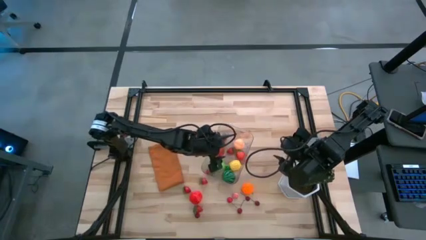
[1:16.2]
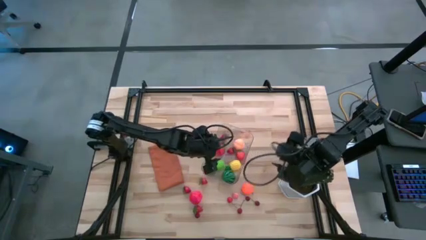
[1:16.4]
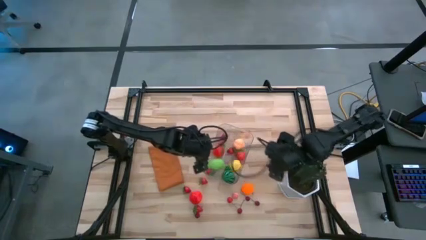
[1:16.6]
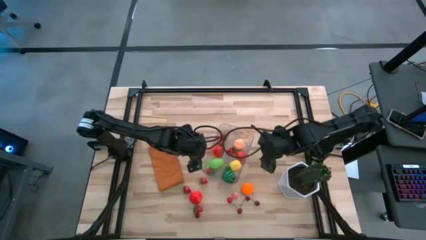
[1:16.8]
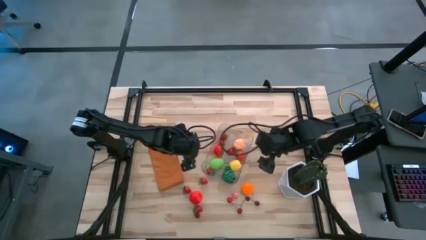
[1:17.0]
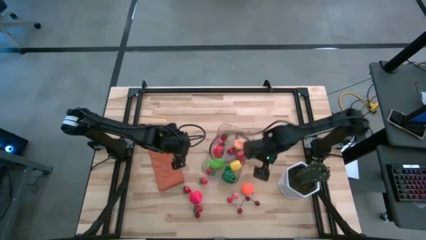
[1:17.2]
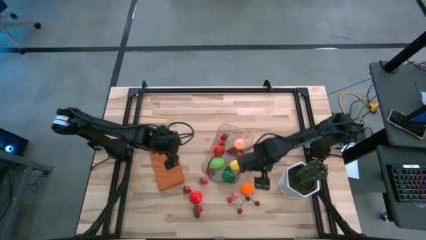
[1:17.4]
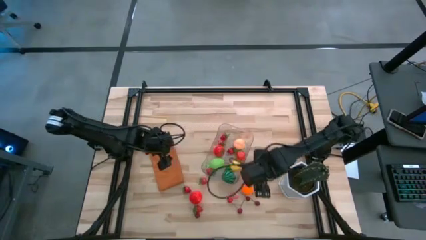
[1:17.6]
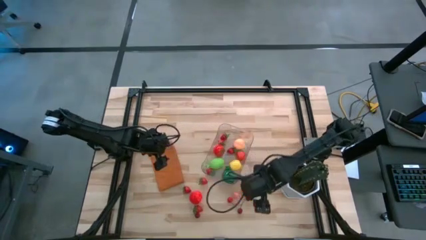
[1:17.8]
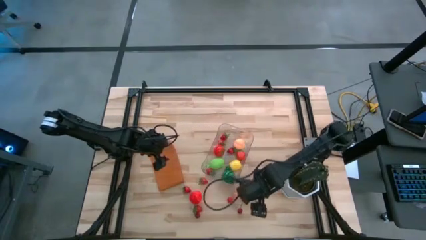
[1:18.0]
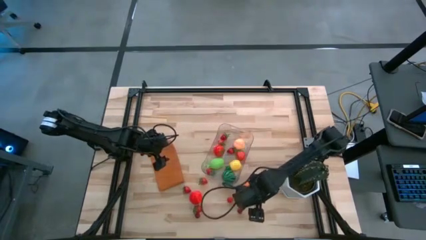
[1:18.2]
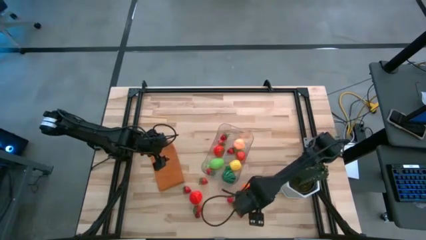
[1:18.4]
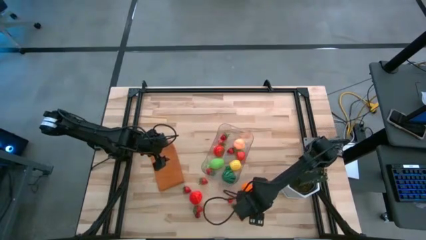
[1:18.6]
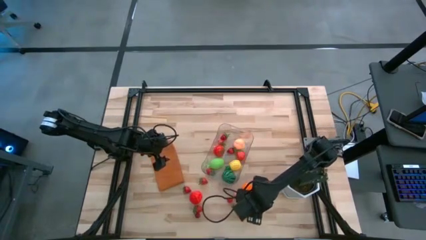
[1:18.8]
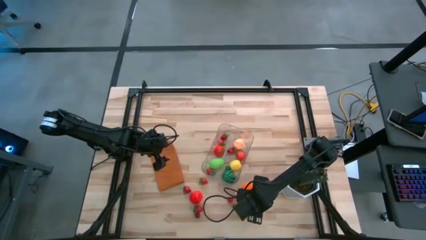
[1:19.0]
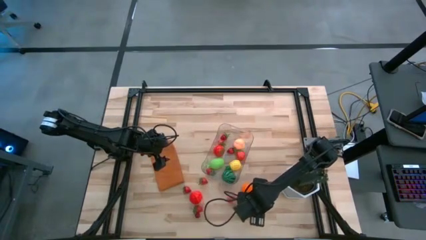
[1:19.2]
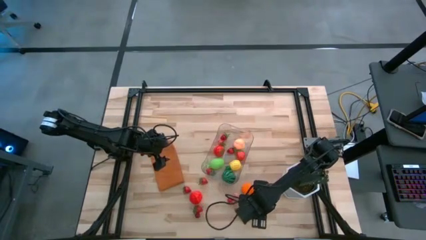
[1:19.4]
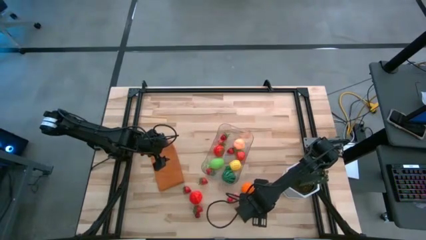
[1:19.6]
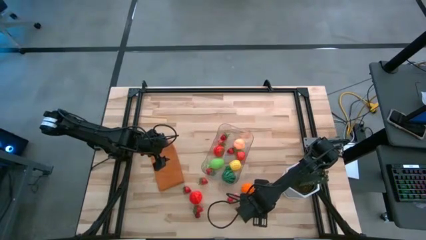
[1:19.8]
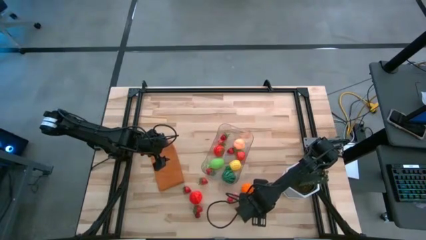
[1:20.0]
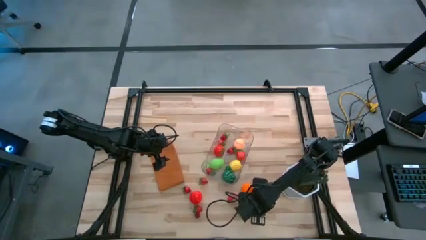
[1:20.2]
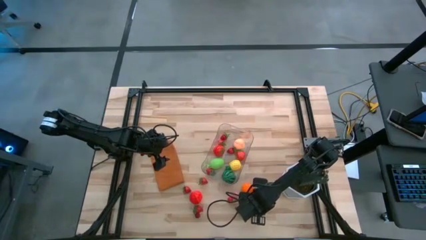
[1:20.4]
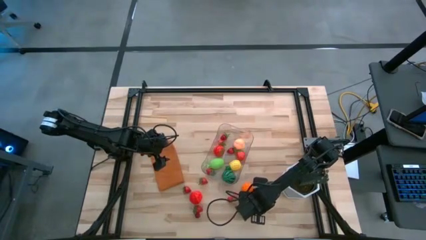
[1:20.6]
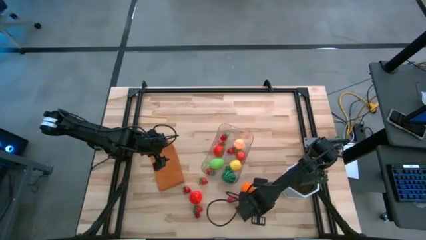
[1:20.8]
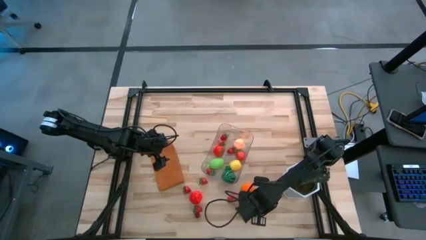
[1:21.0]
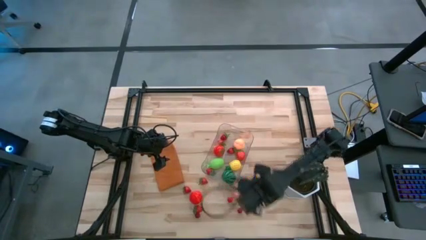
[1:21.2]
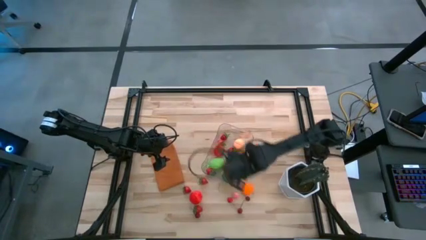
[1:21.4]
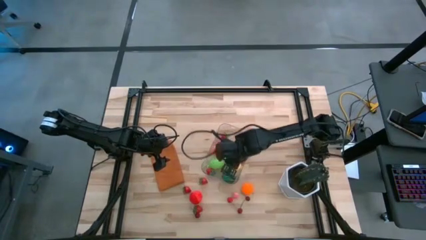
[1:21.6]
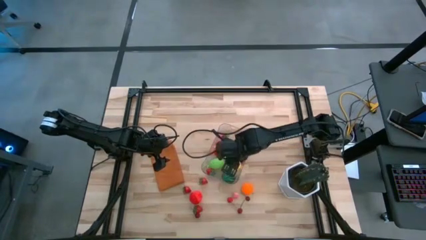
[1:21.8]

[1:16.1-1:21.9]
Task: Pick and placing Produce into tupperware
Put the red cherry into the transparent bin

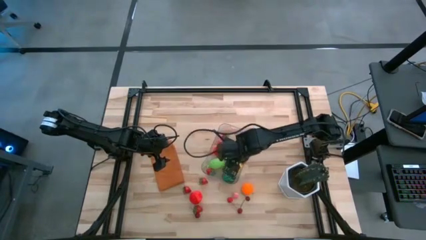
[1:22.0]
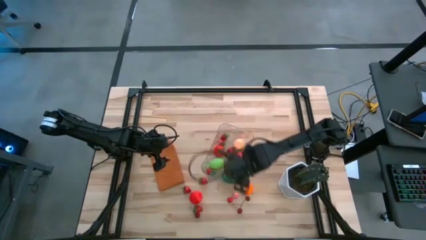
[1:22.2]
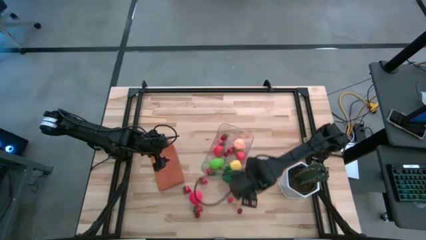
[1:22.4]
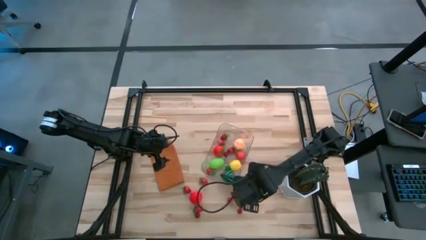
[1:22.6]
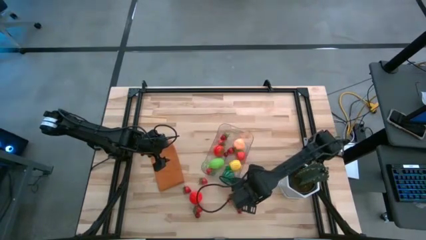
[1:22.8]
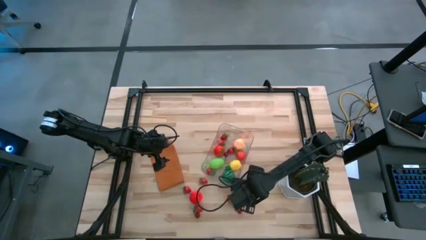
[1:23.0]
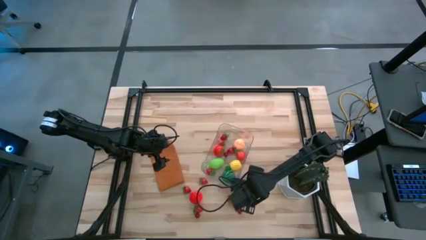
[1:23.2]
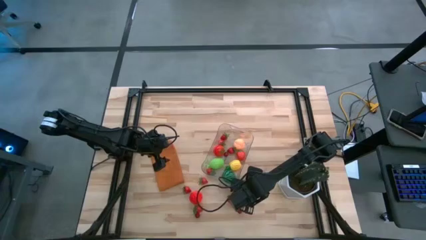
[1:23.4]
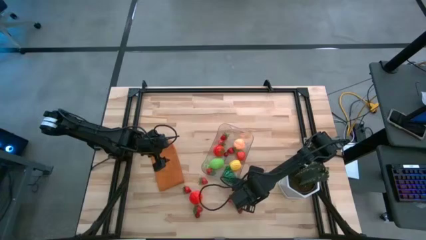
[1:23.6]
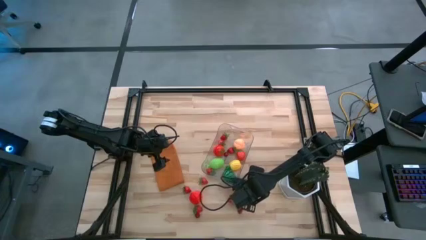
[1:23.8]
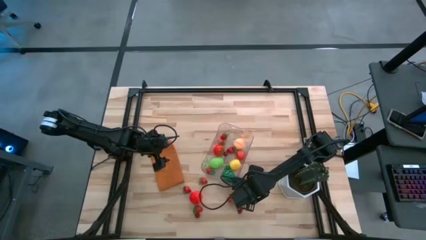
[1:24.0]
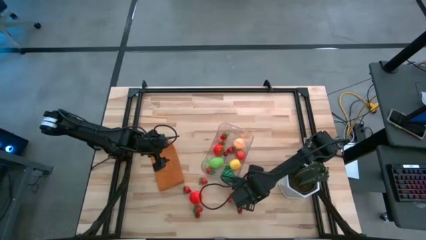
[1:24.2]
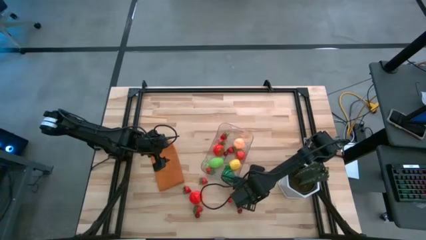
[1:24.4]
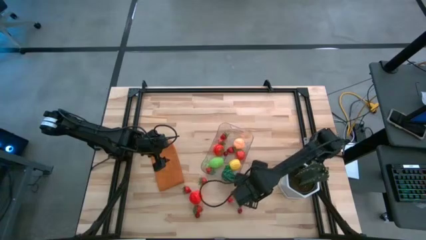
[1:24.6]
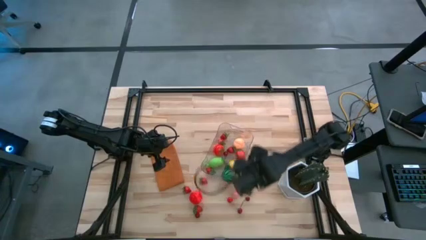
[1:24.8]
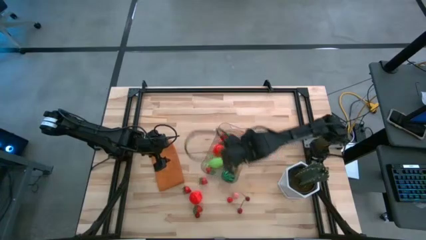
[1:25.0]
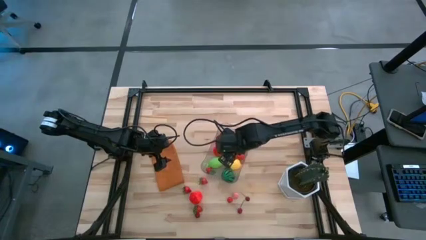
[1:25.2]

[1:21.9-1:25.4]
Put the orange pumpkin into the transparent bin

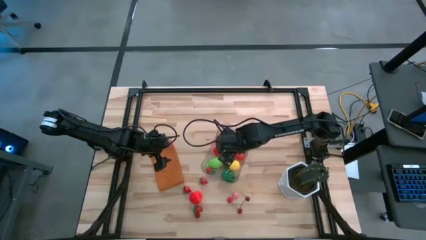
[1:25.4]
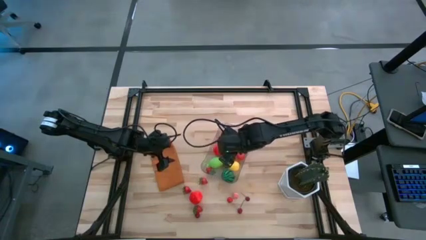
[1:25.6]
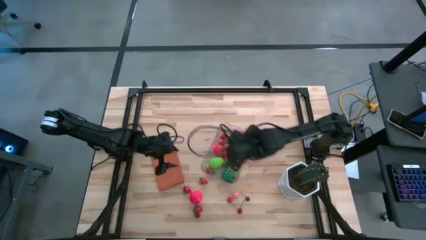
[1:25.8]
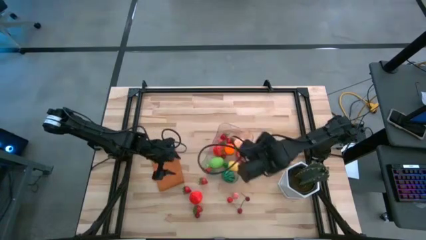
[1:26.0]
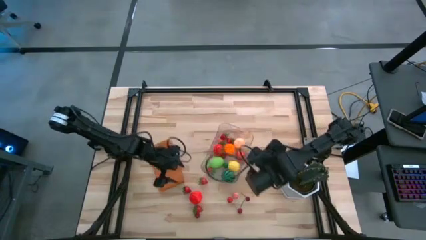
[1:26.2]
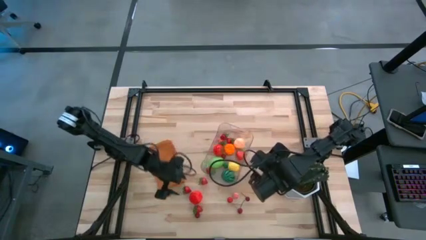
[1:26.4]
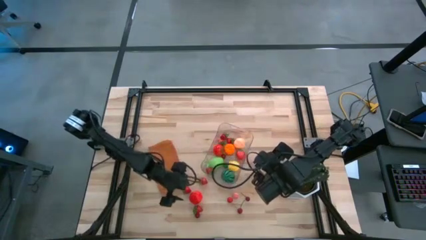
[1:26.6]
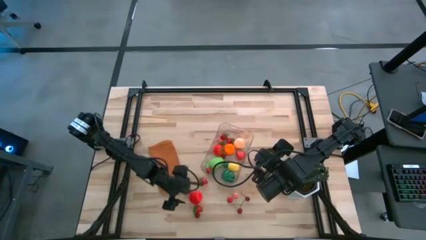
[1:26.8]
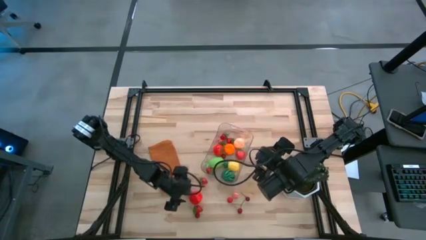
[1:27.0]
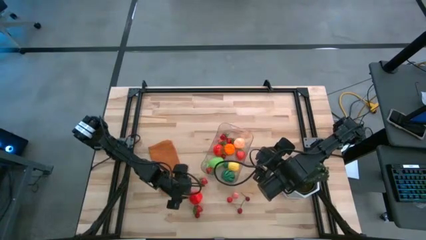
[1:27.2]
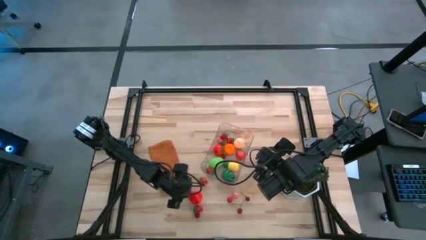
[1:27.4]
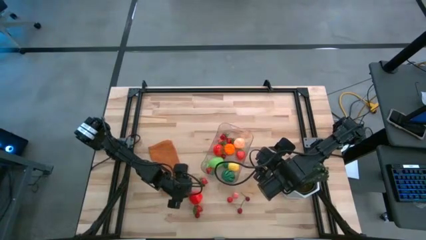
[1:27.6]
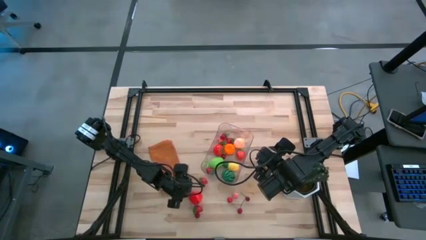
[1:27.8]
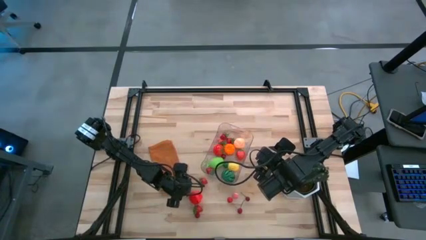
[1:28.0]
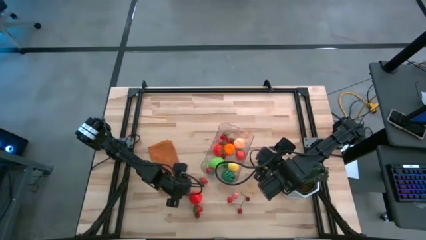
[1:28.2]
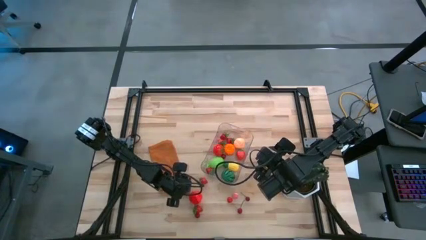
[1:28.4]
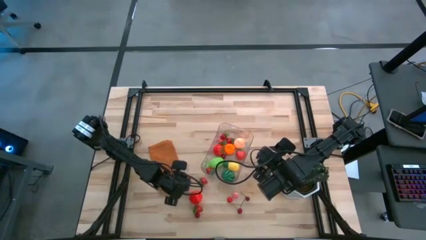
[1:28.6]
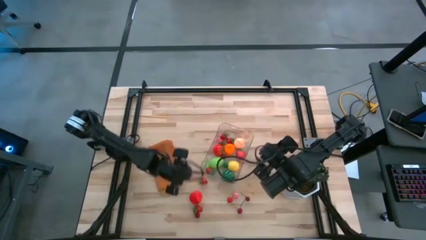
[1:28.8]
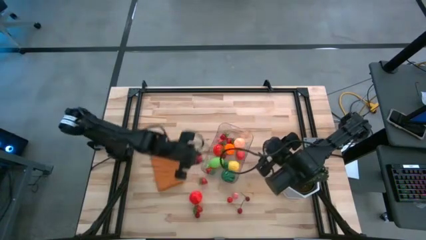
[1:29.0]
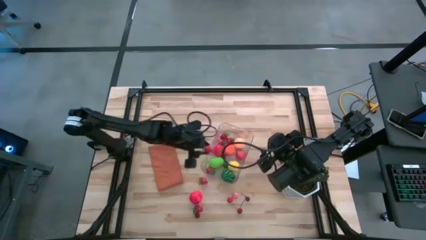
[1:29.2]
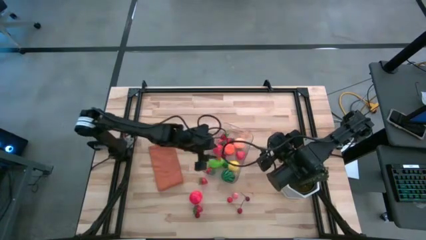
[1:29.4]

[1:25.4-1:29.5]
Put the red strawberry into the transparent bin

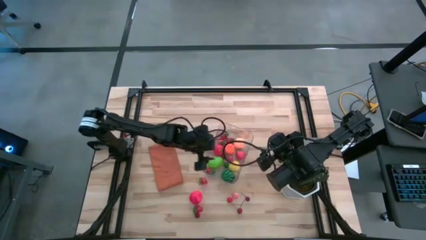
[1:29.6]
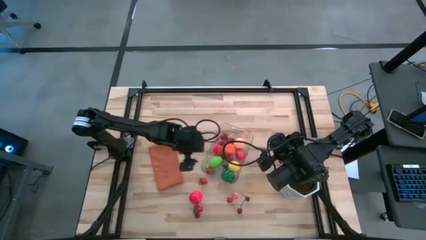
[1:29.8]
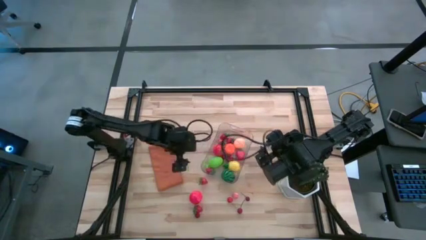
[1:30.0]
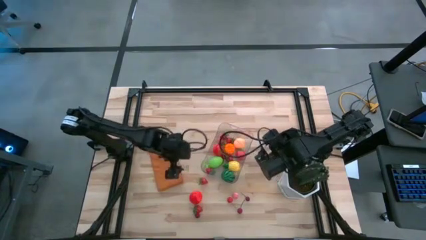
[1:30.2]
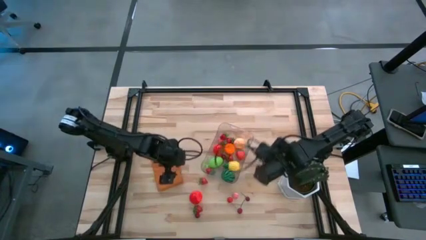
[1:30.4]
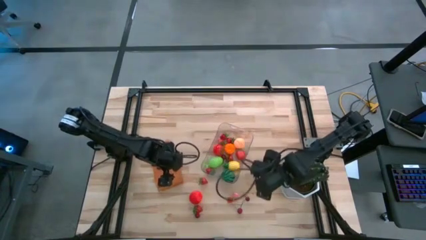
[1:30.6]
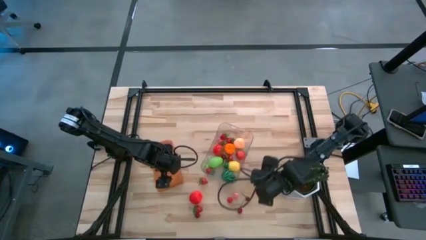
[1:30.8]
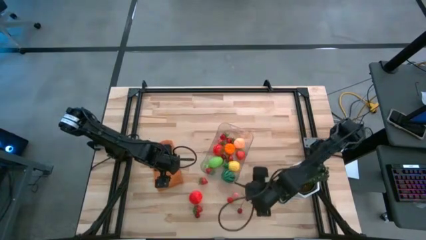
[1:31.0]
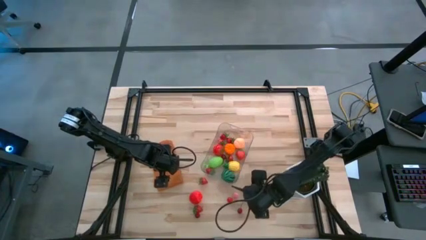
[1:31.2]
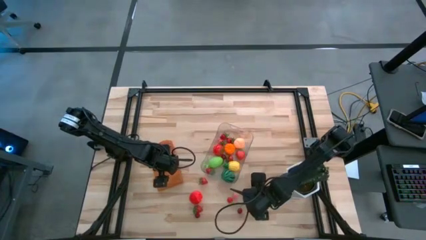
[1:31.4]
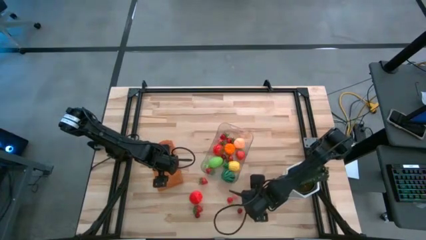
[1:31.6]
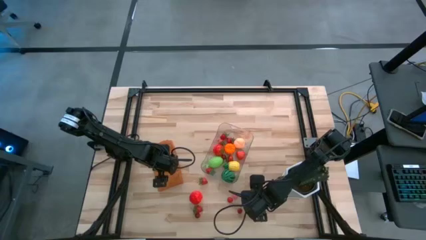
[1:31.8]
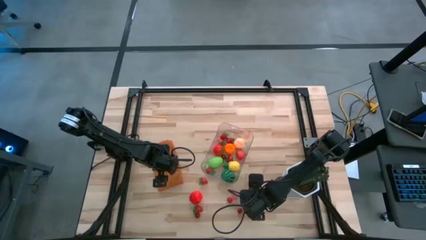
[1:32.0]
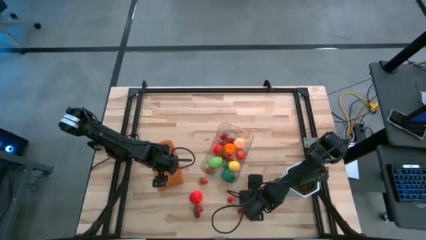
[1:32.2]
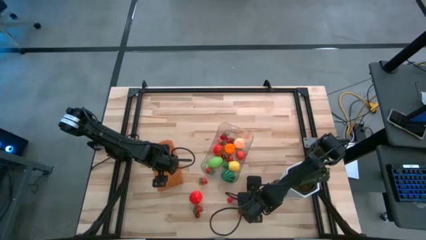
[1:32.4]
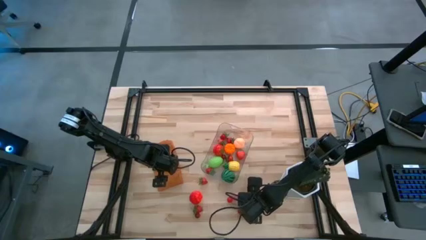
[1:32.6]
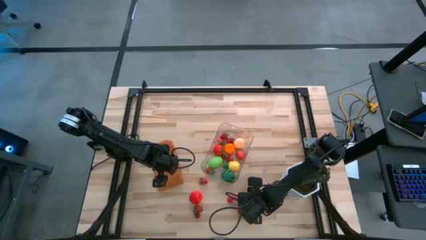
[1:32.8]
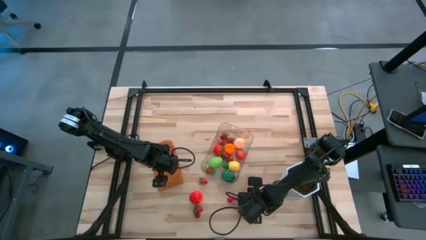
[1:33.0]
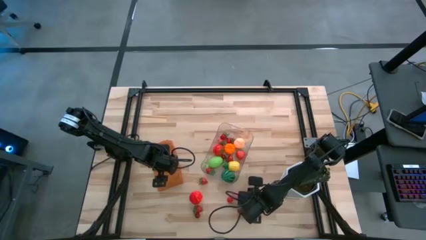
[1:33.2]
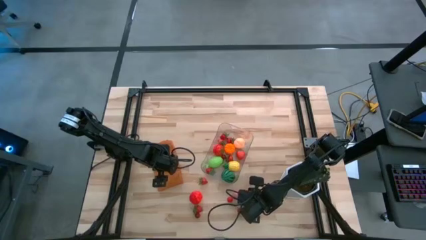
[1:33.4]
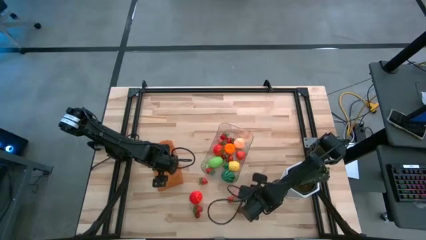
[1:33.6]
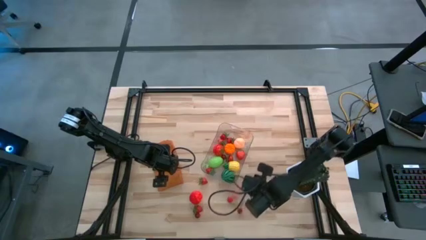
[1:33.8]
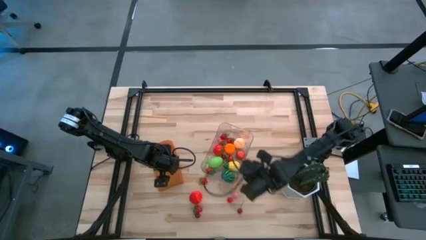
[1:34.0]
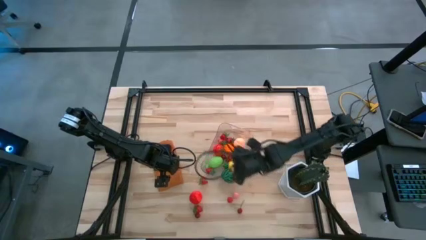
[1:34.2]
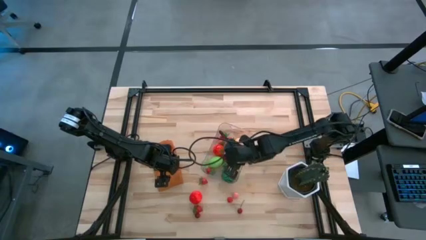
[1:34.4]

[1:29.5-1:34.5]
Put the red cherry into the transparent bin
